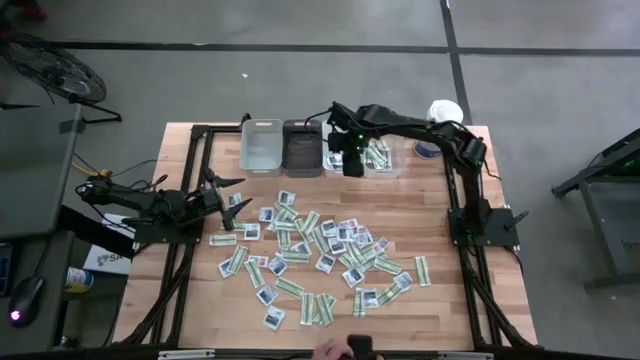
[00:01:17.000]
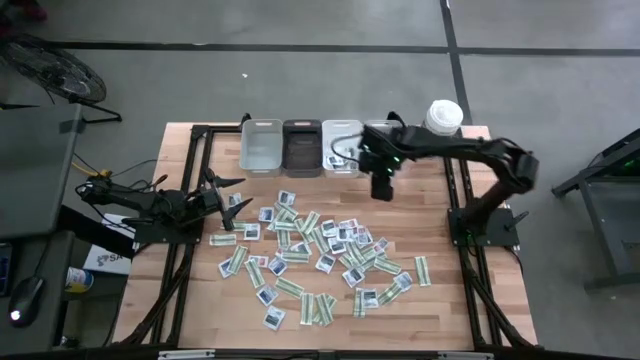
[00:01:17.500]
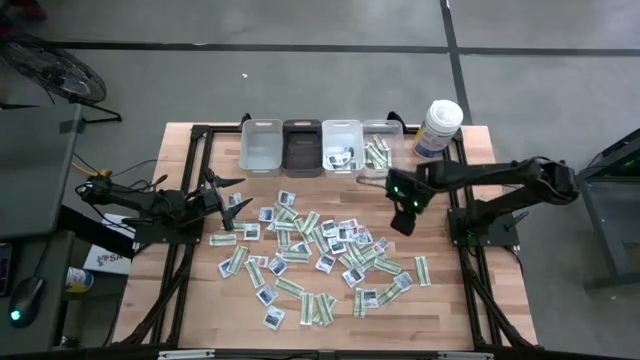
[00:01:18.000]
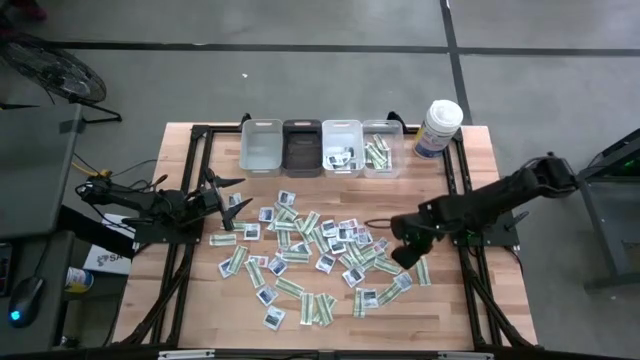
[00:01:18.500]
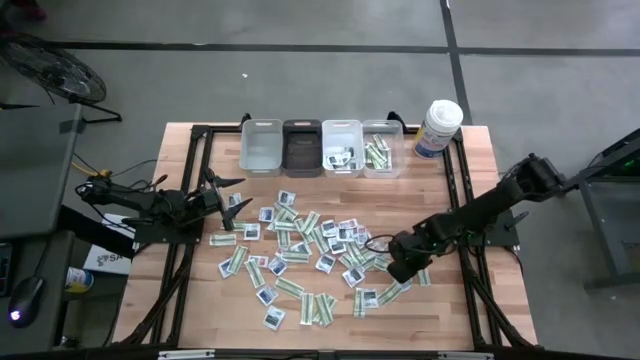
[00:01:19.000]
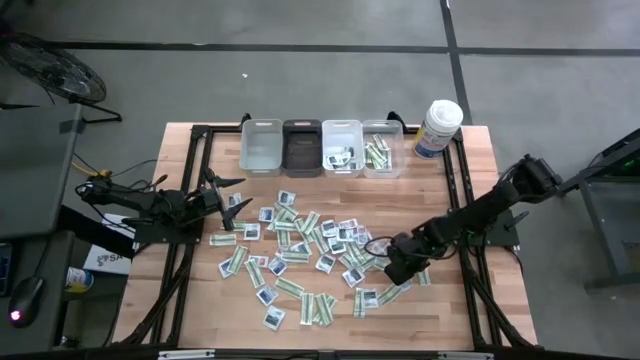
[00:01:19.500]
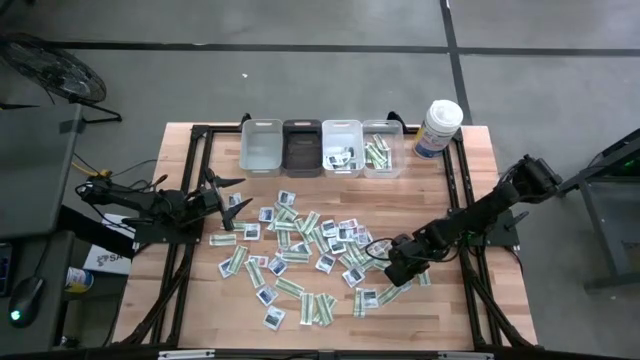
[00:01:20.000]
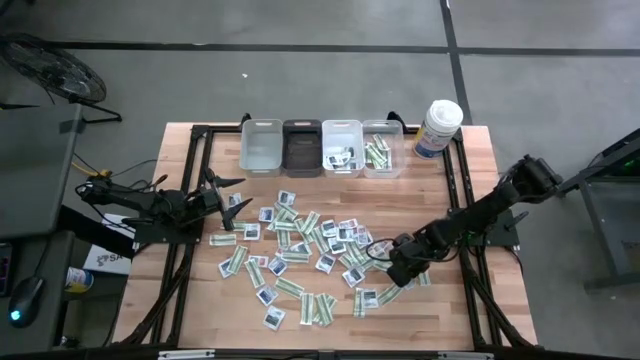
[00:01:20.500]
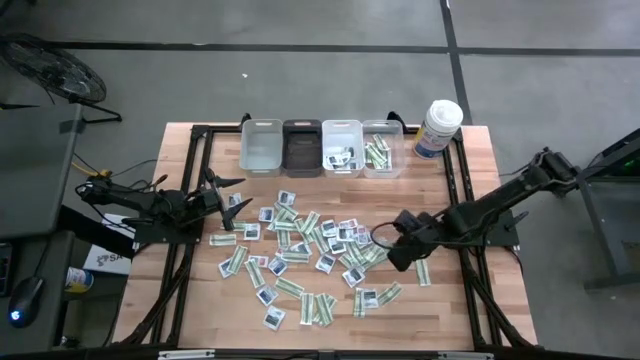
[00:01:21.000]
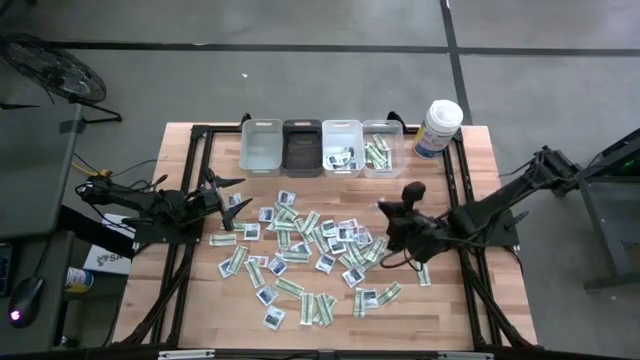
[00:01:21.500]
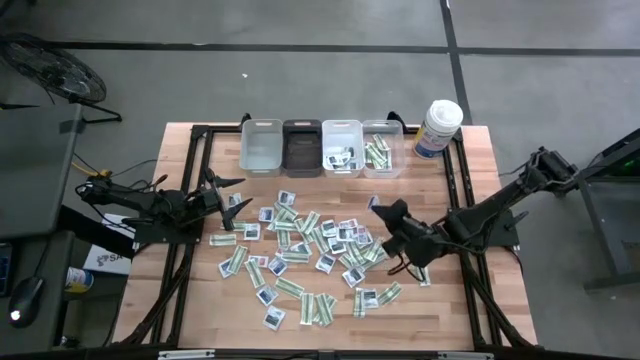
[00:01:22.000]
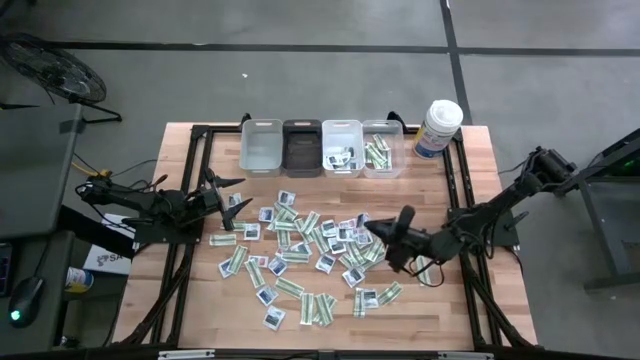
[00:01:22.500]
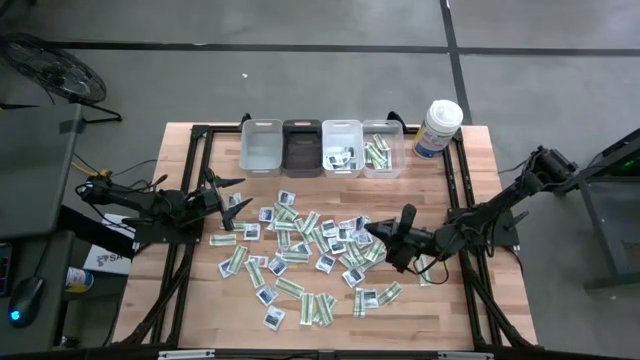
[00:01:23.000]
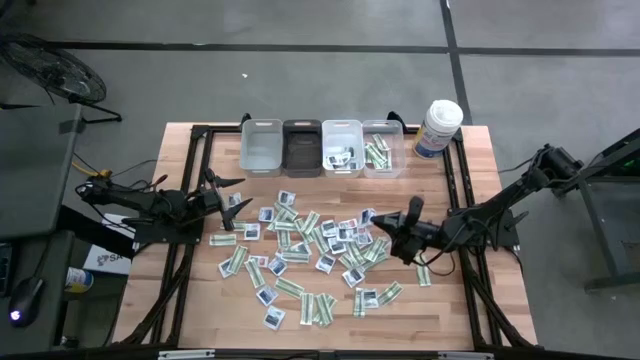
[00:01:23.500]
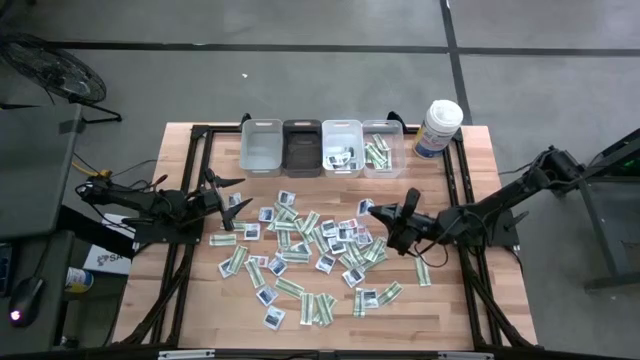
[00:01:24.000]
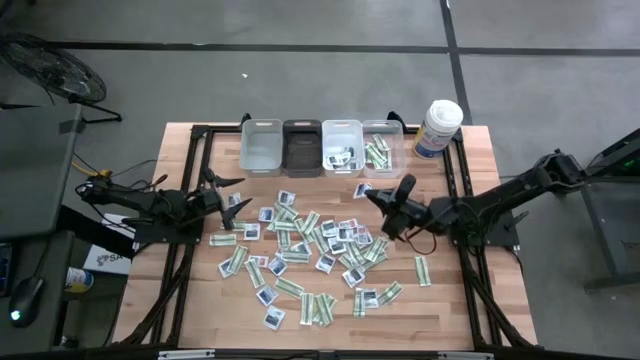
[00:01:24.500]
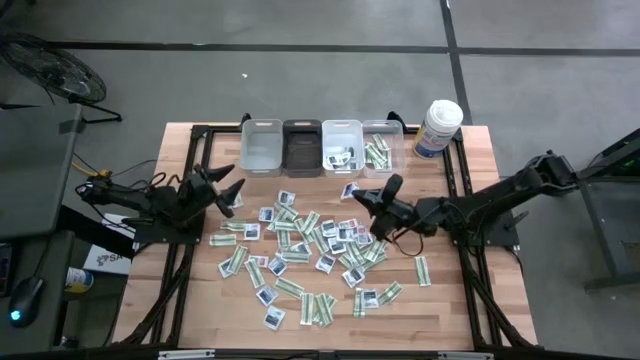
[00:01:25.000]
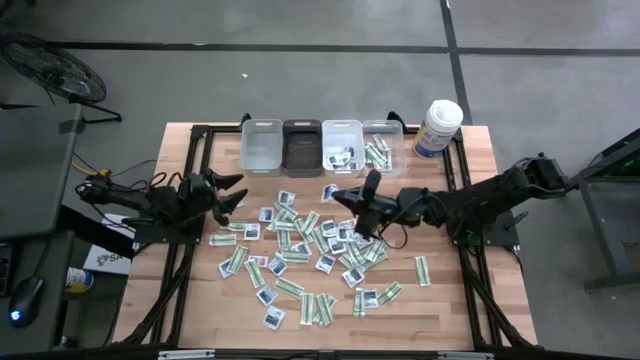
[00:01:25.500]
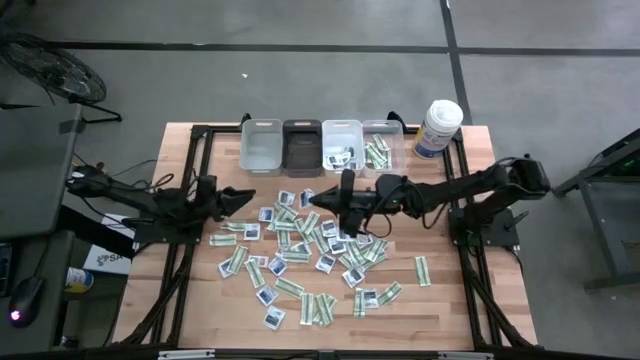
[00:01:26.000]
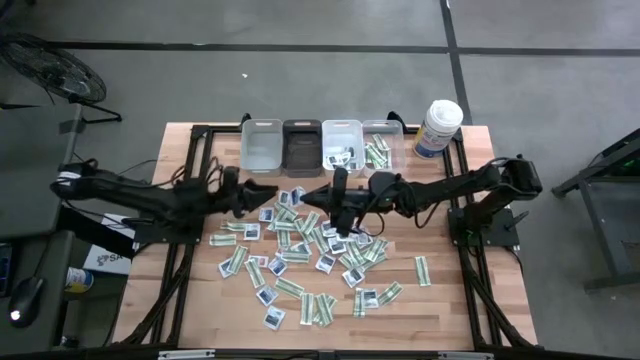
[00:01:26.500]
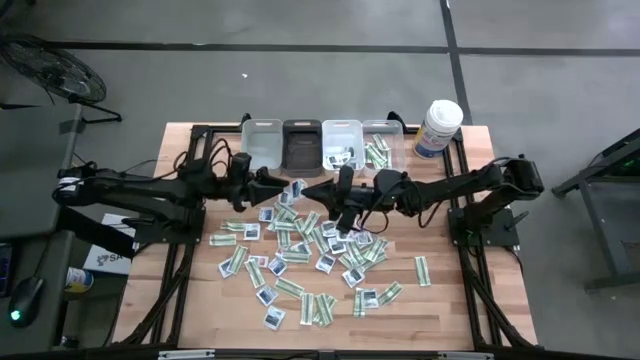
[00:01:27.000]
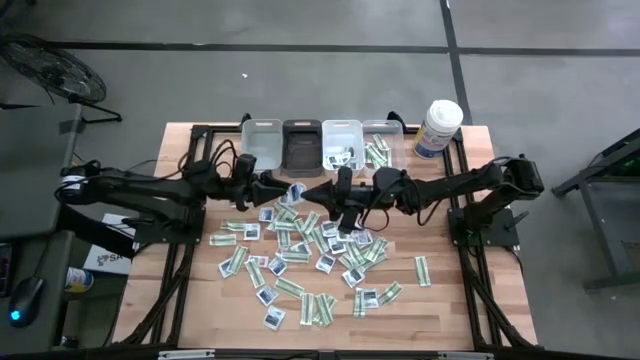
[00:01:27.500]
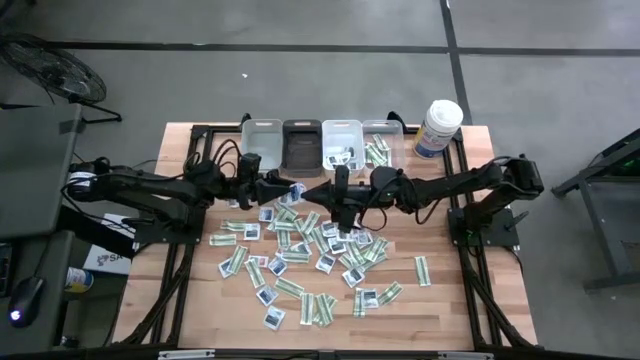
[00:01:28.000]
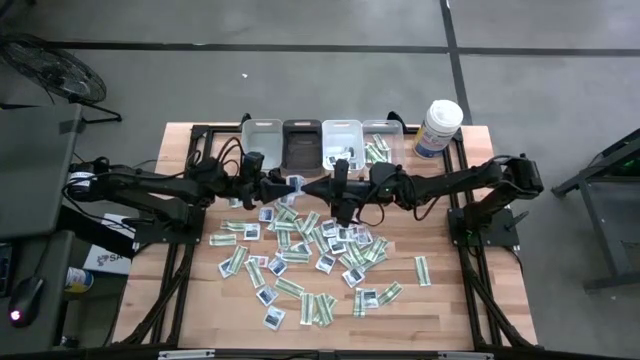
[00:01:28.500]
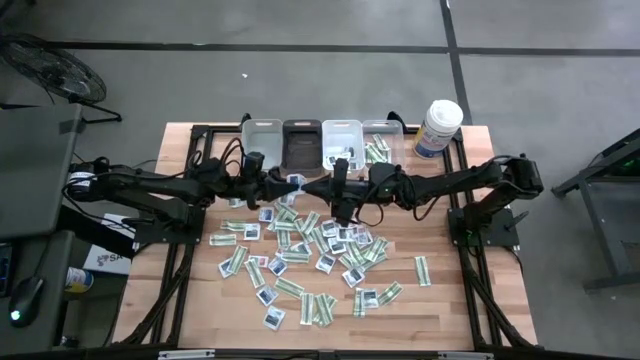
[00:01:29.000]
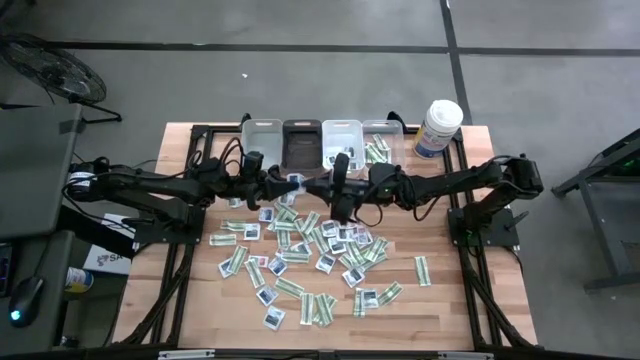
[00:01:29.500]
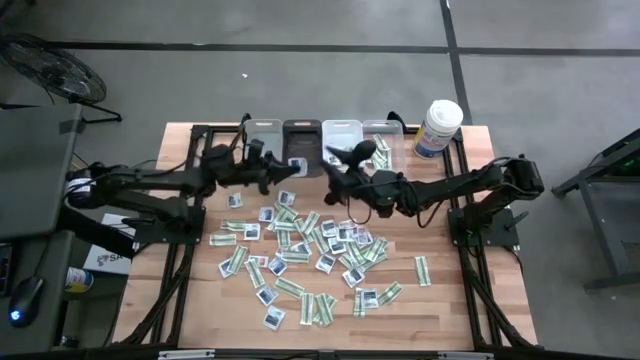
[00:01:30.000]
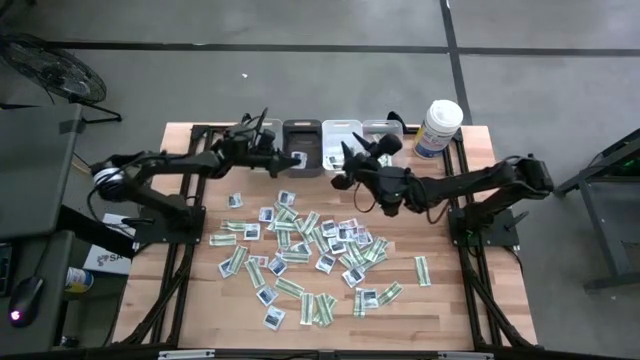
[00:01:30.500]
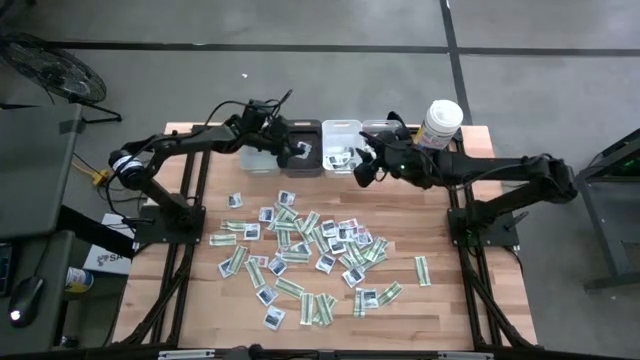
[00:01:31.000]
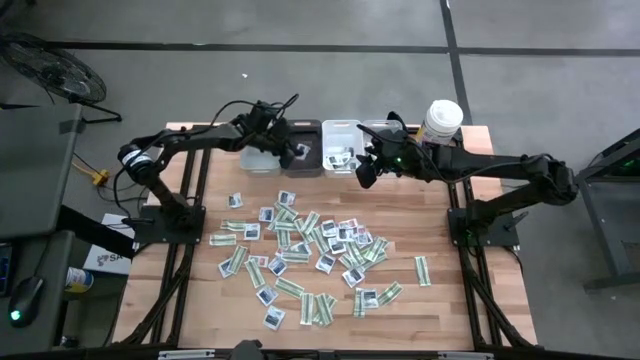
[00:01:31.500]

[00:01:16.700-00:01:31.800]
Task: Pick & Place First Aid Supplies
Put the blue alcohol pad into the black bin

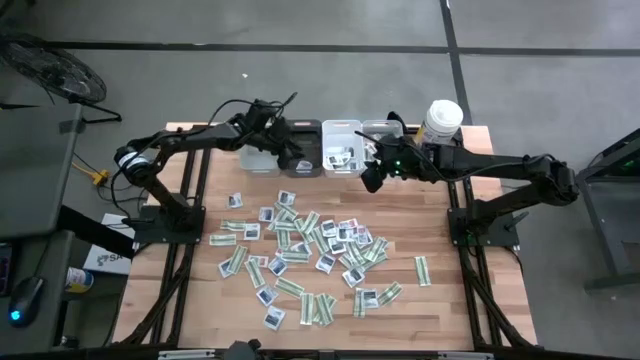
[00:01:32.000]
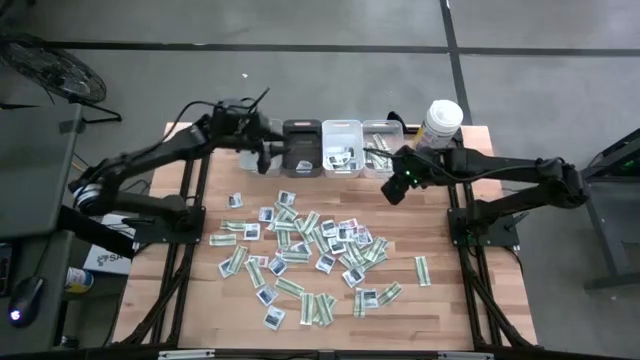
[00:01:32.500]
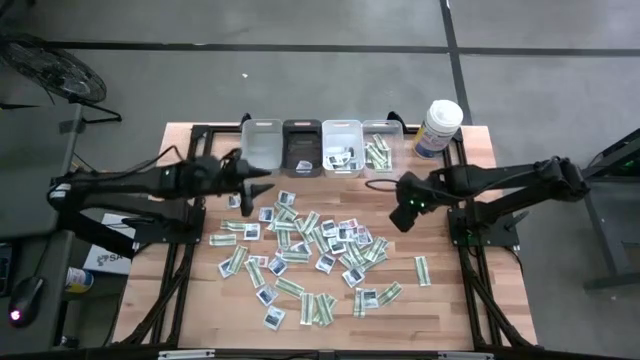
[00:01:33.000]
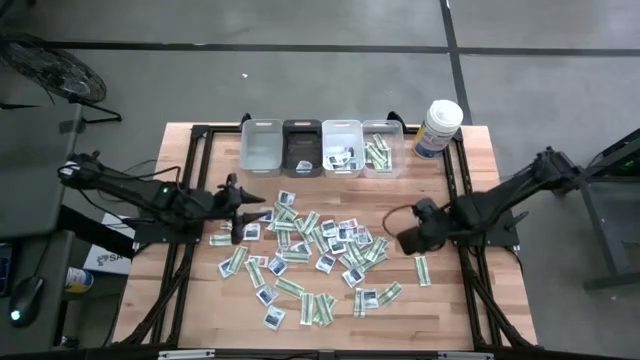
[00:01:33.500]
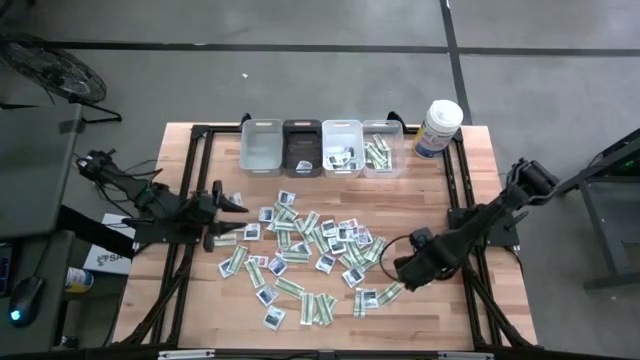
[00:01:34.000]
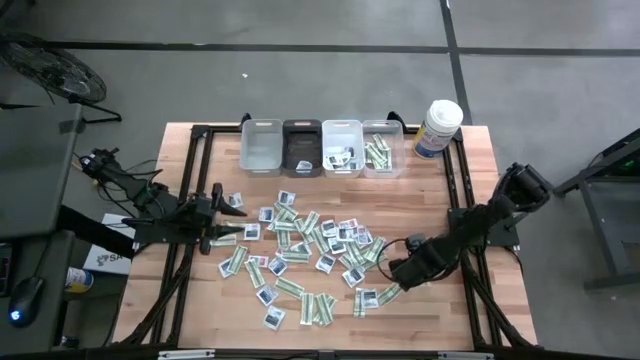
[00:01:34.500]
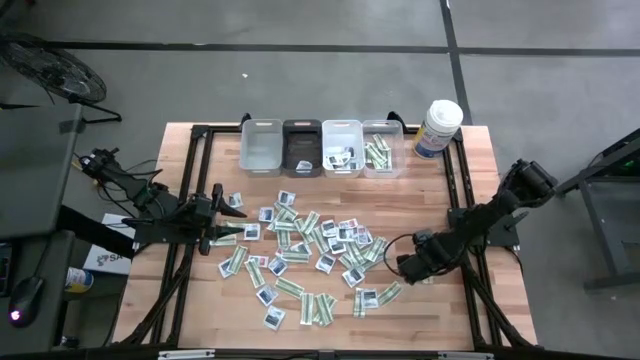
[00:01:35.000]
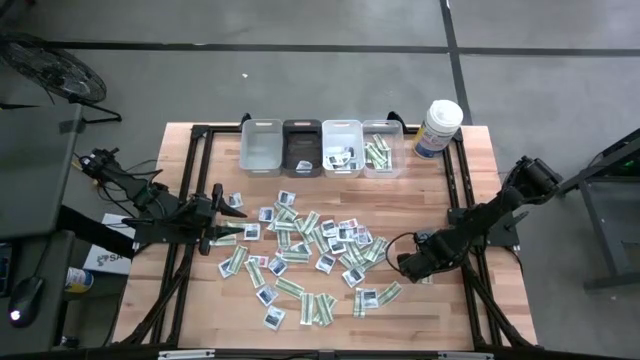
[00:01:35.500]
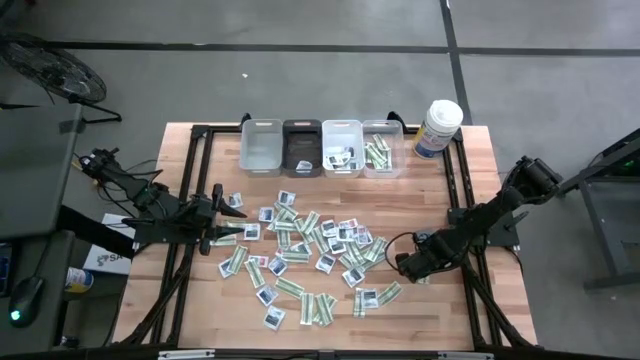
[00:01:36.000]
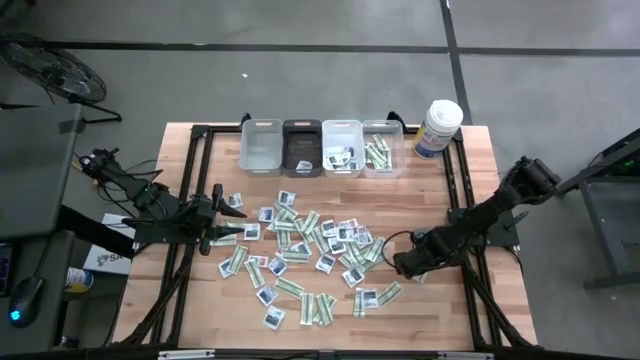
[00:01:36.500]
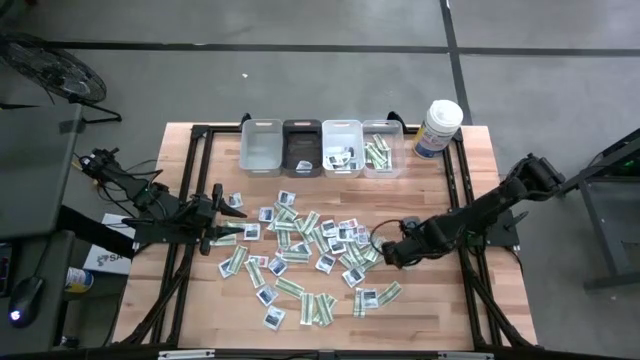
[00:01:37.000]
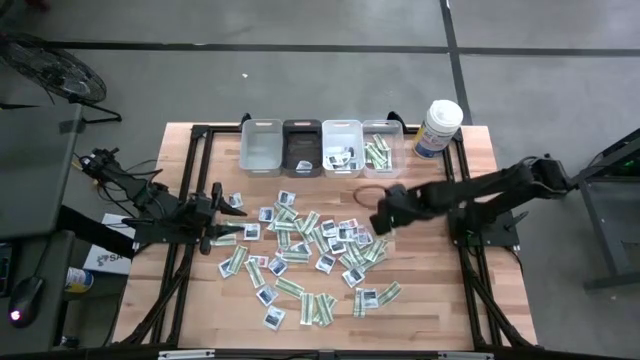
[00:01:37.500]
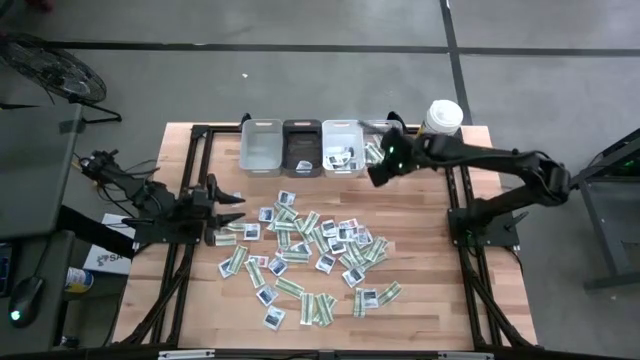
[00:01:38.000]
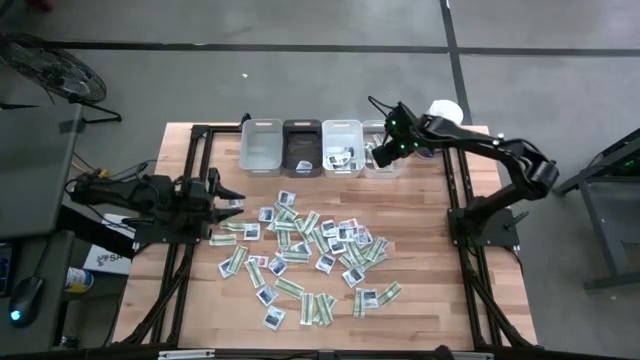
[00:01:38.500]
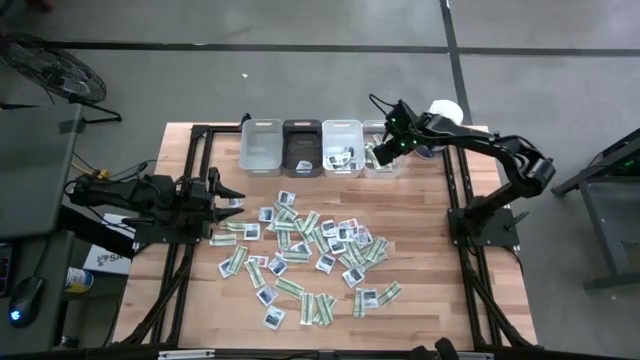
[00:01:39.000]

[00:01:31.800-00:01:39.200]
Put the green bandage into the transparent bin
